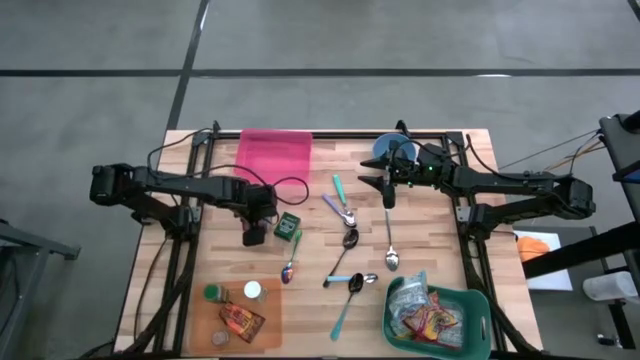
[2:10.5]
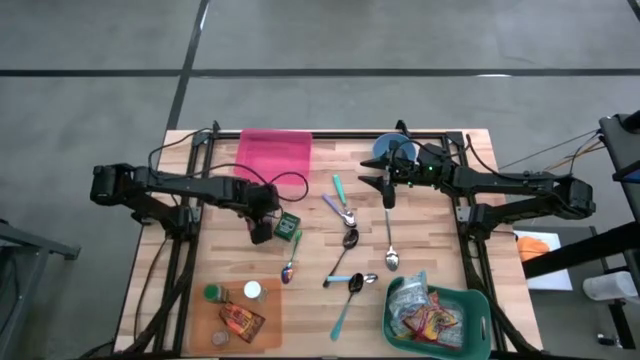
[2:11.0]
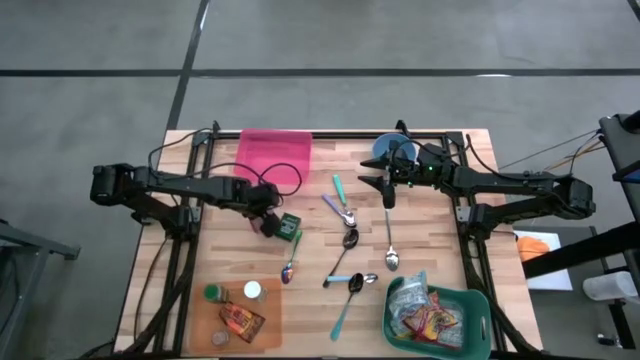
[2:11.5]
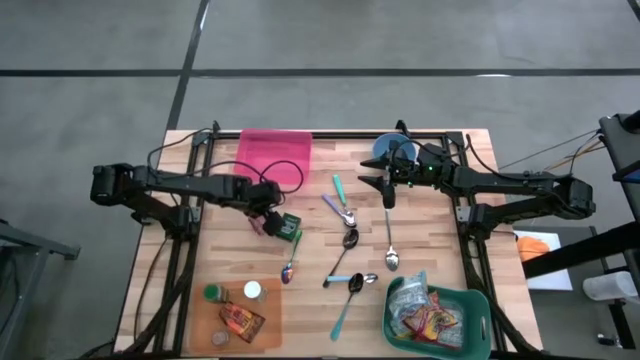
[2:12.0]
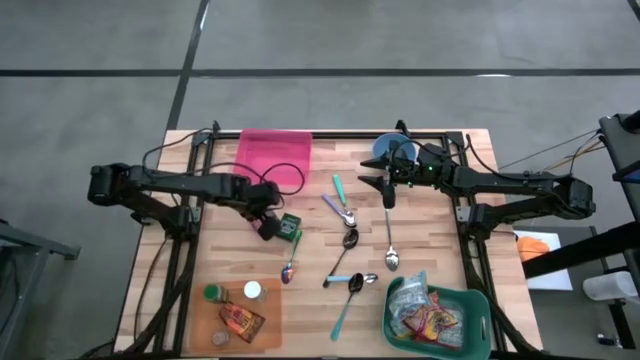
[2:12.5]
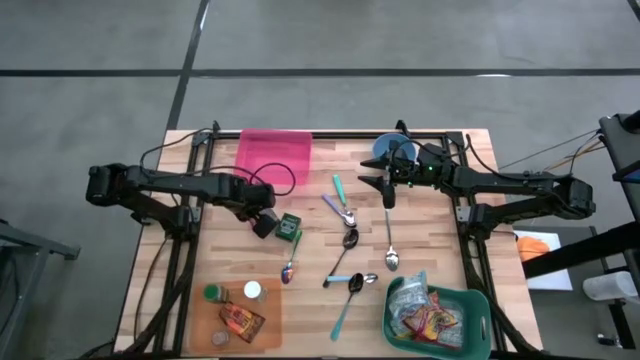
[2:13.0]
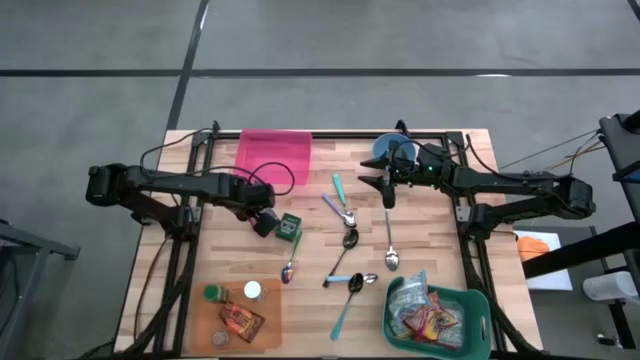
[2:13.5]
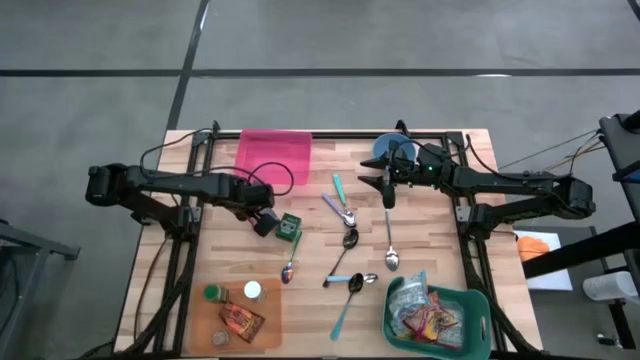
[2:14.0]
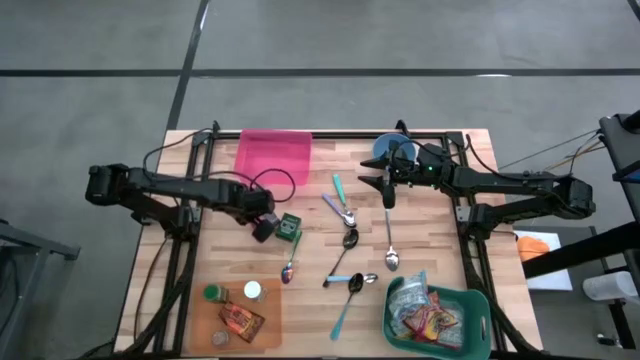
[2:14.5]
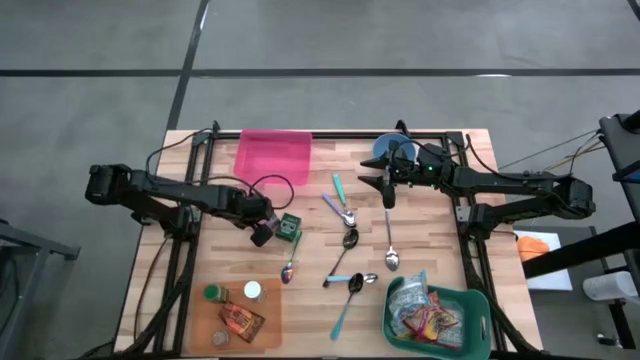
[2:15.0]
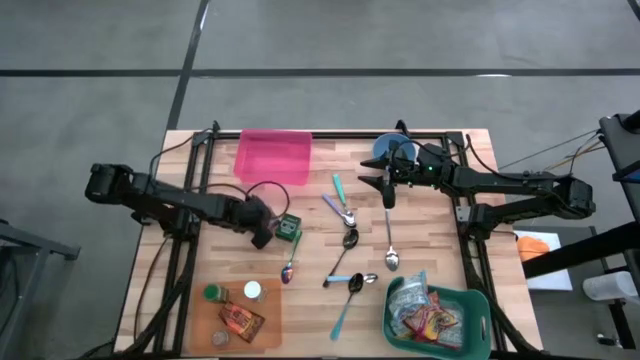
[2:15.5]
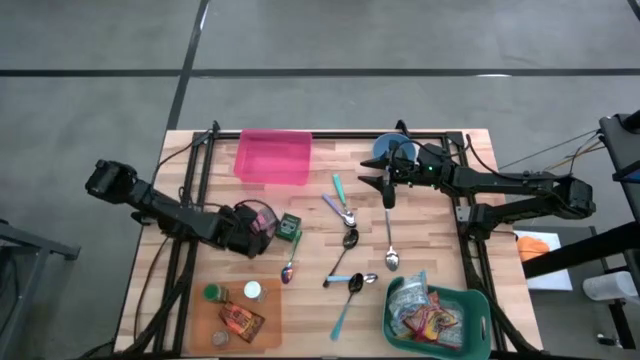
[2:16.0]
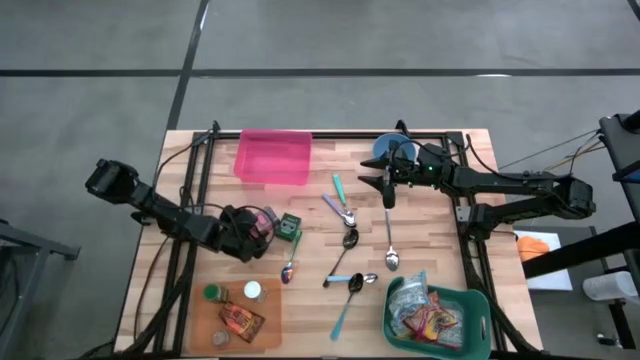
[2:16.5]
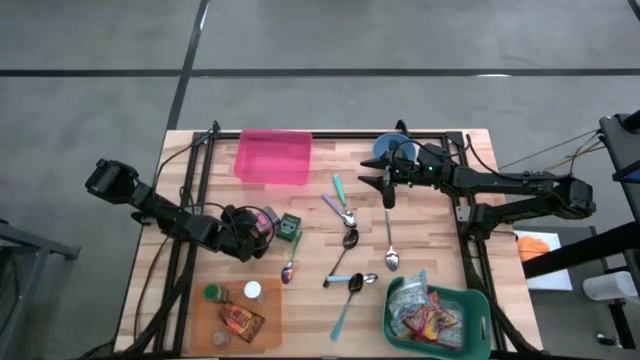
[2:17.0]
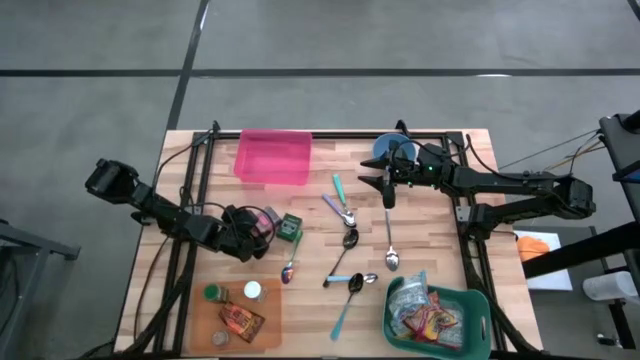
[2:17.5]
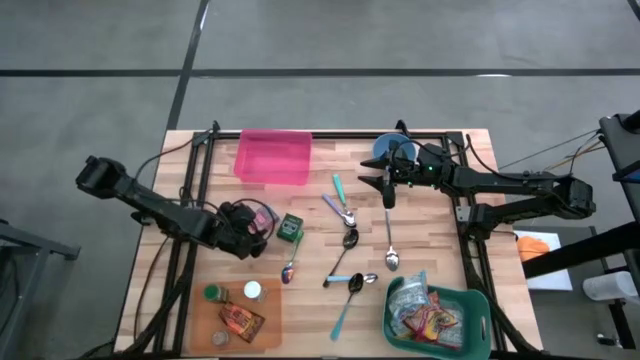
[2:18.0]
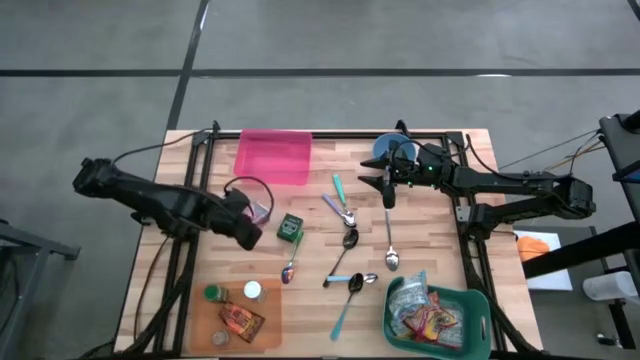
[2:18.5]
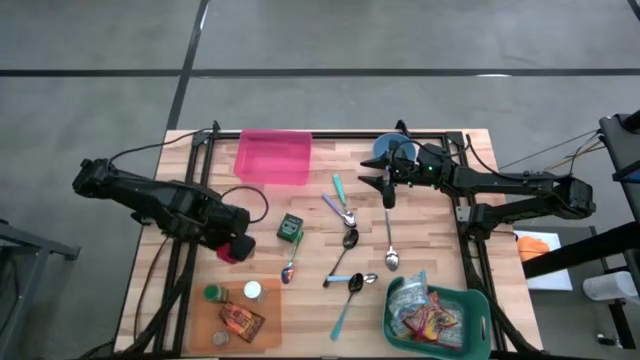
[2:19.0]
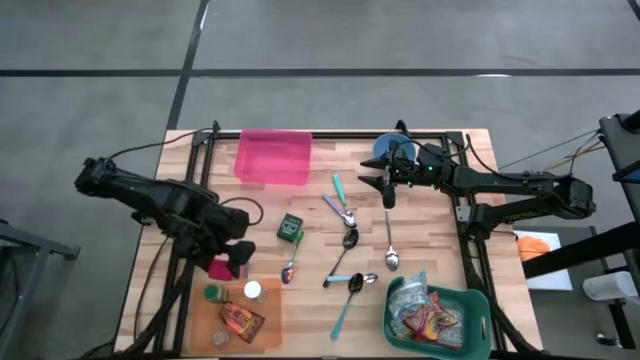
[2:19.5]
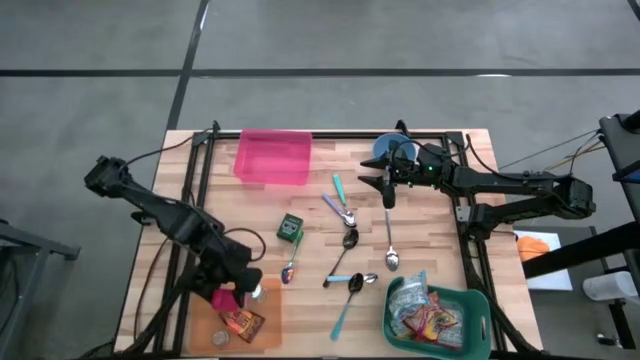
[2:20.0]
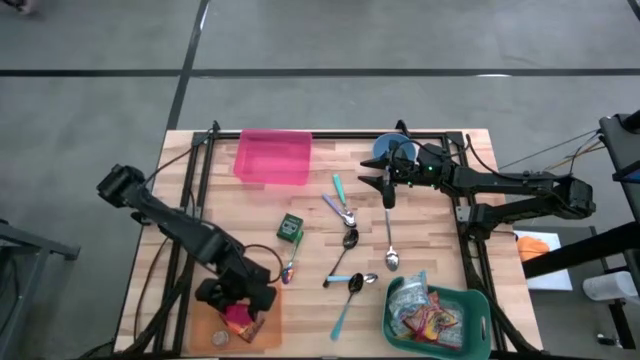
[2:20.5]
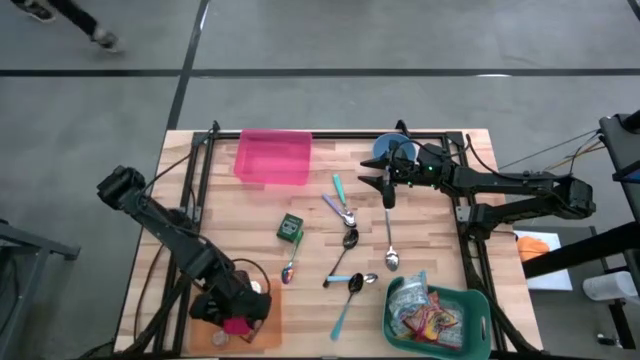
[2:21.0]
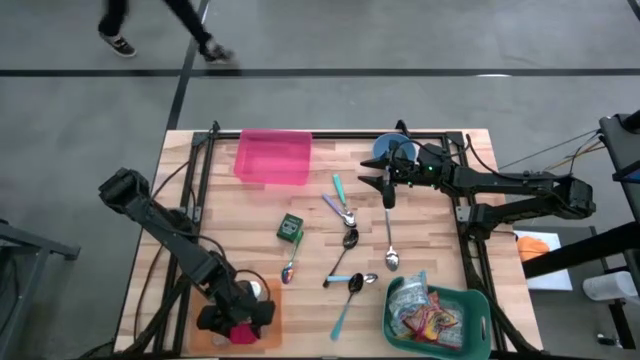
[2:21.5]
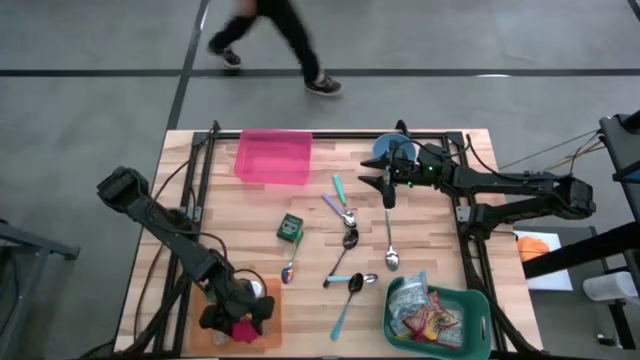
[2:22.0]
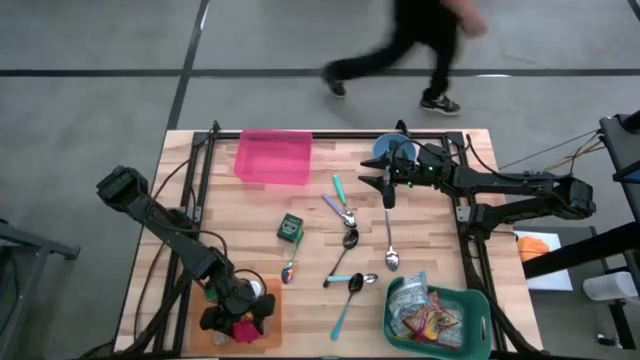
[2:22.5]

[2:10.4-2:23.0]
Put the red seasoning can into the orange bin

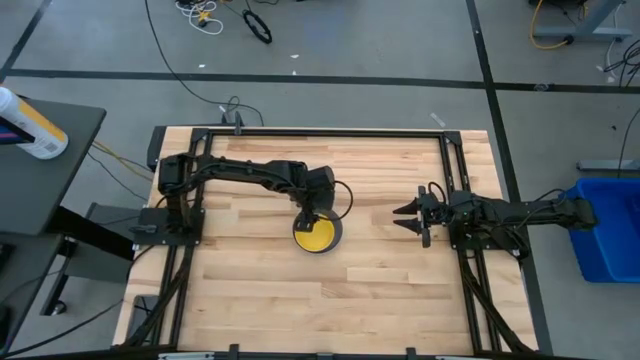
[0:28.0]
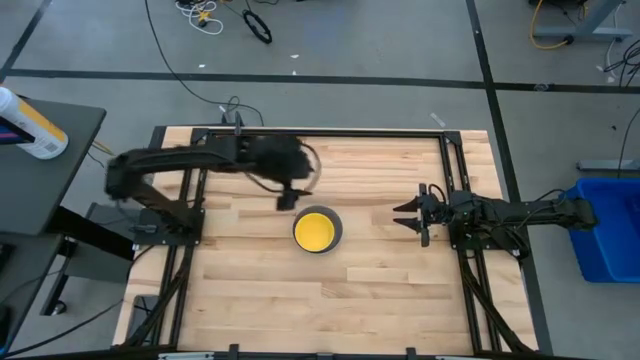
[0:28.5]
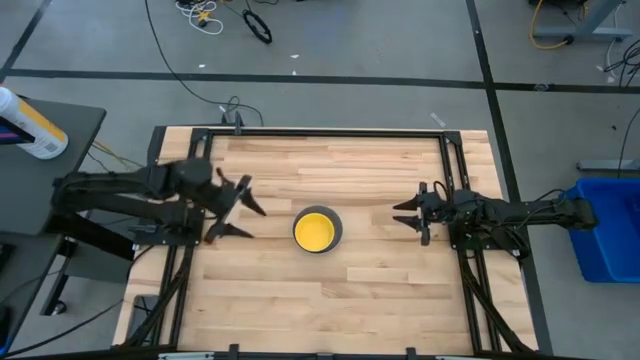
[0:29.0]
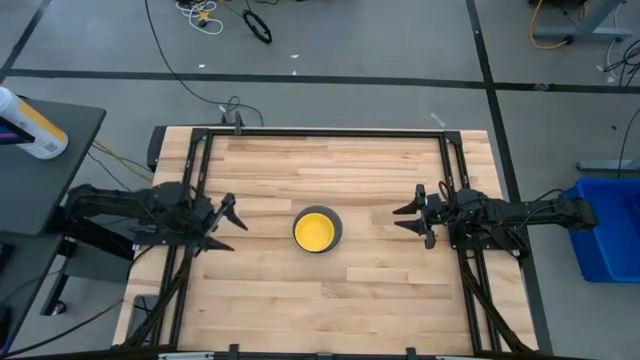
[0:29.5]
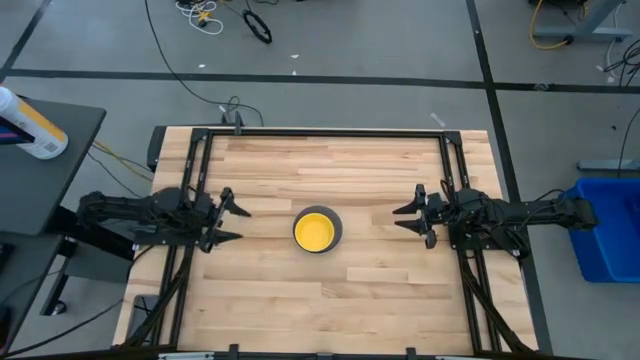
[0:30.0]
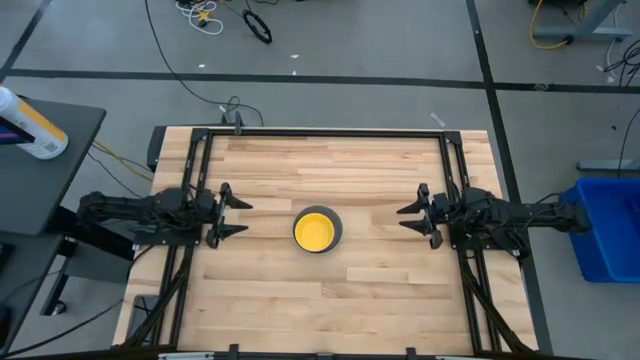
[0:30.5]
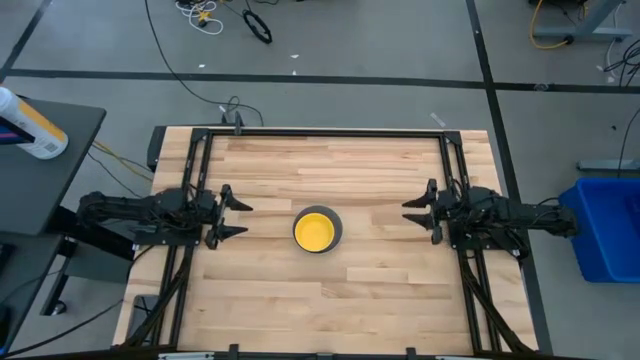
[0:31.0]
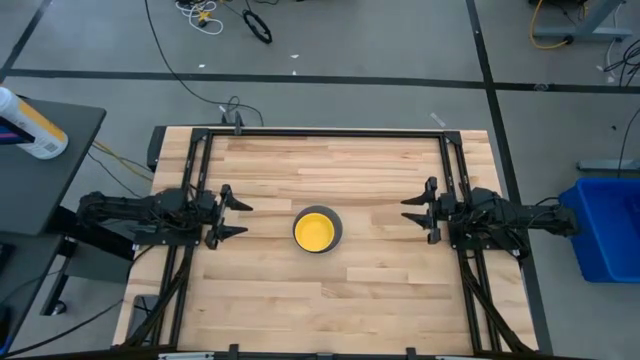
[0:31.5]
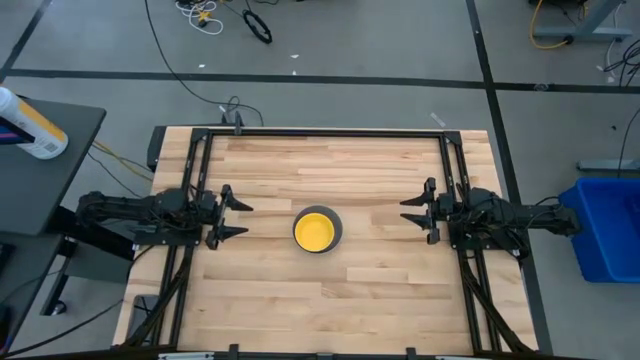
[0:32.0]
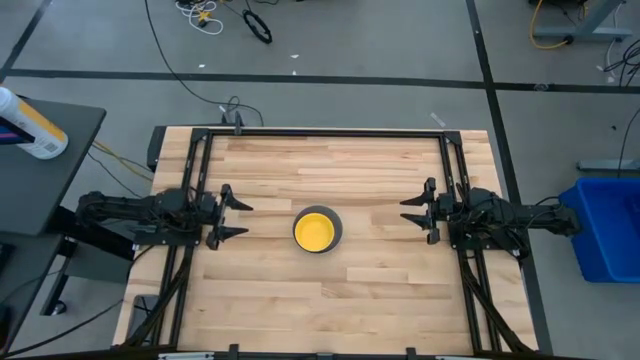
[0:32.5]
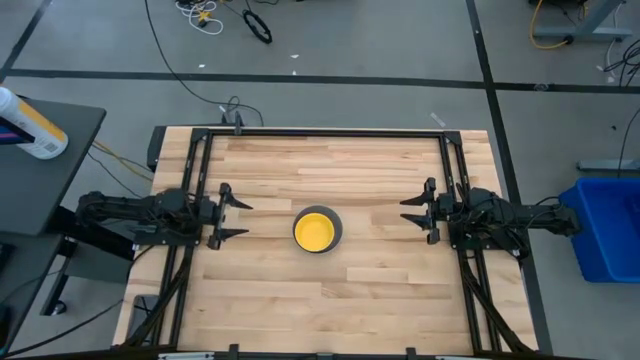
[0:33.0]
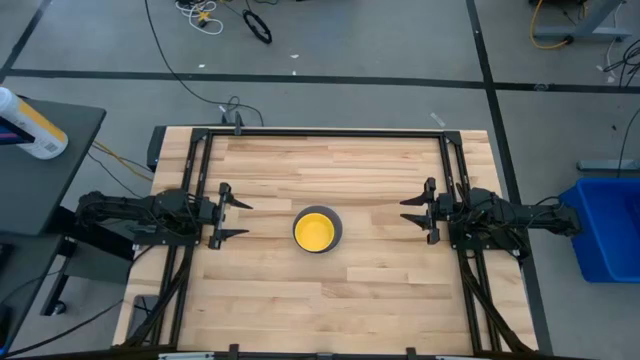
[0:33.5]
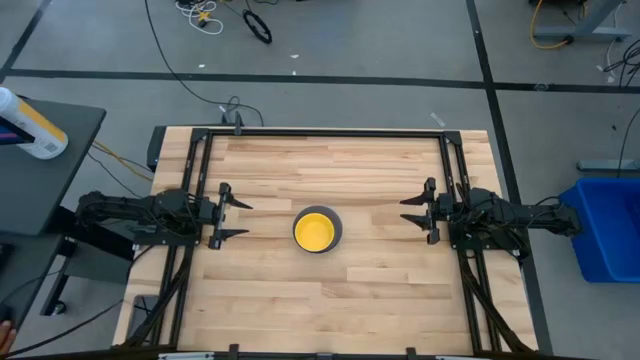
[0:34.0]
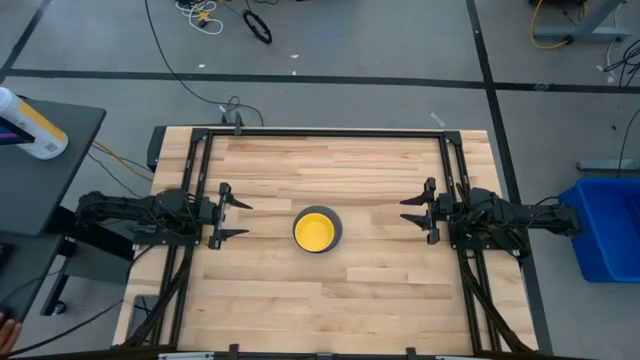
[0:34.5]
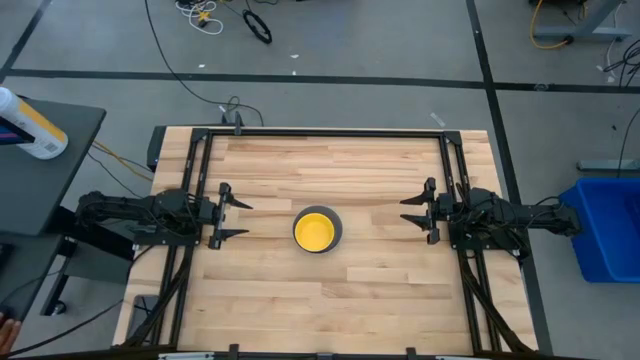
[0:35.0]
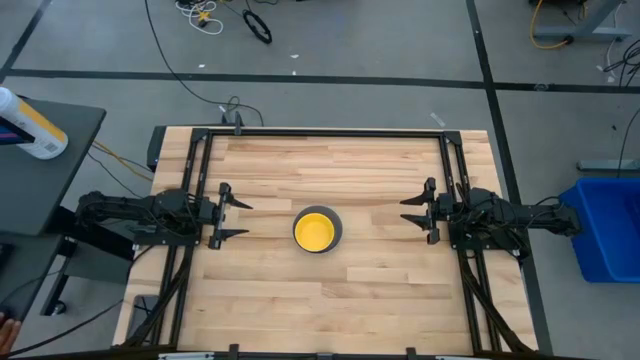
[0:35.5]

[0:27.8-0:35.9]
Return to home position

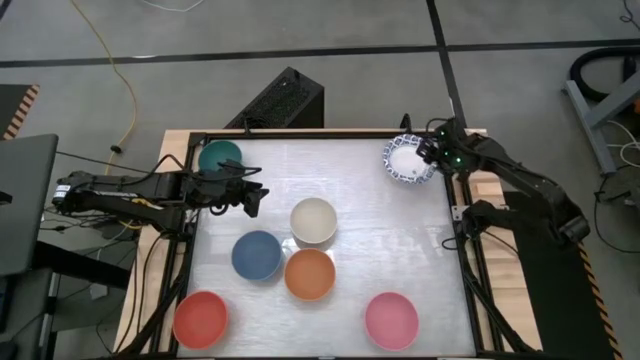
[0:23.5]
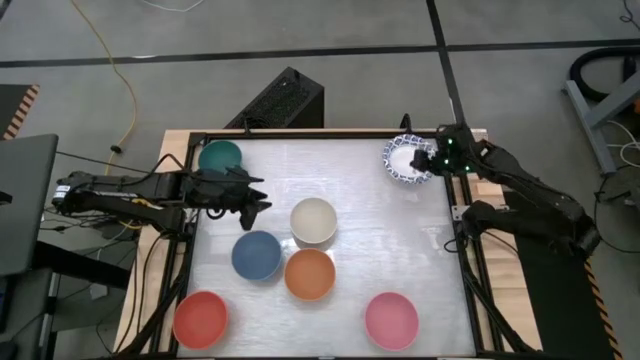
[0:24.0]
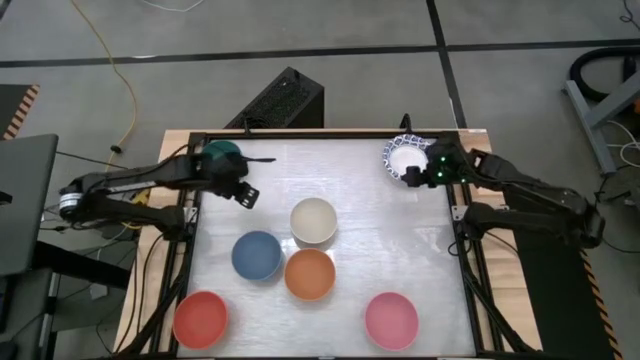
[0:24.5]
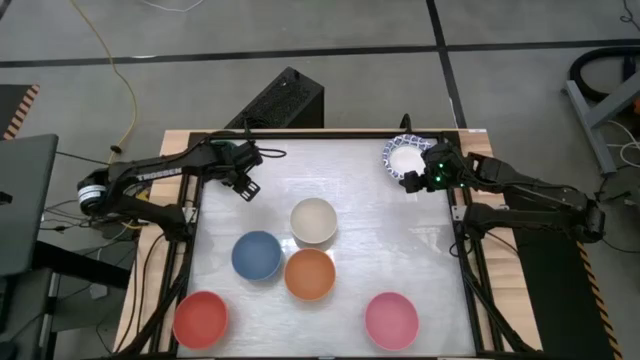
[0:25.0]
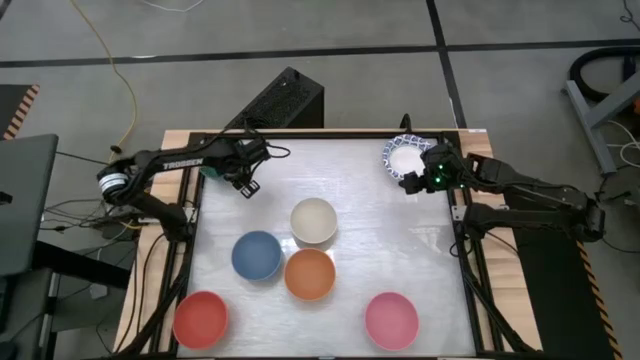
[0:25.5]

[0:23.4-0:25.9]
Stack the green bowl into the blue patterned paper bowl
